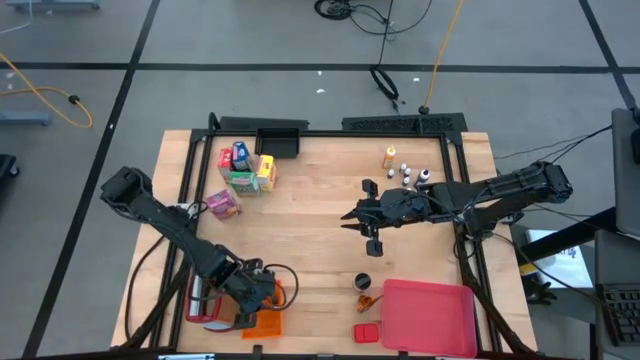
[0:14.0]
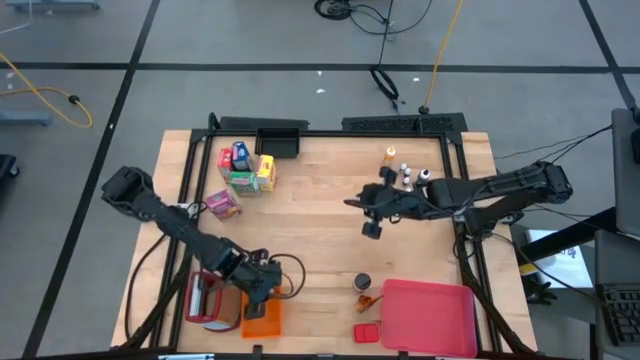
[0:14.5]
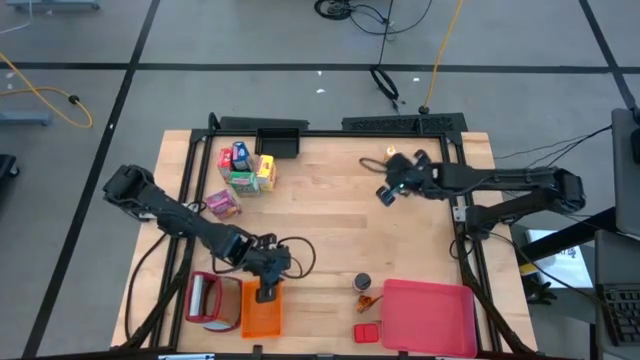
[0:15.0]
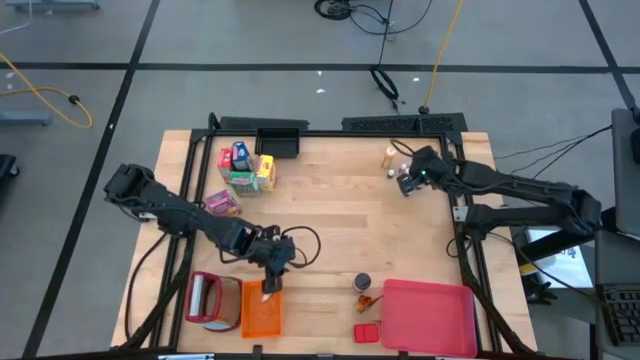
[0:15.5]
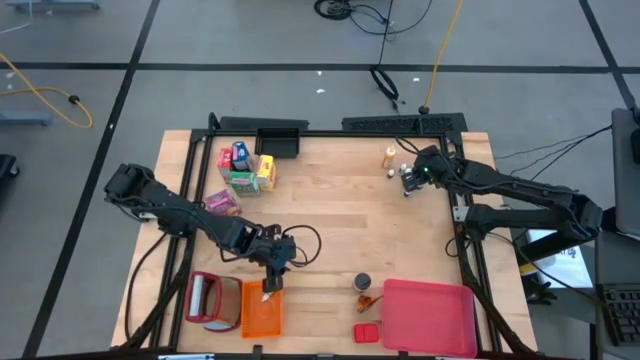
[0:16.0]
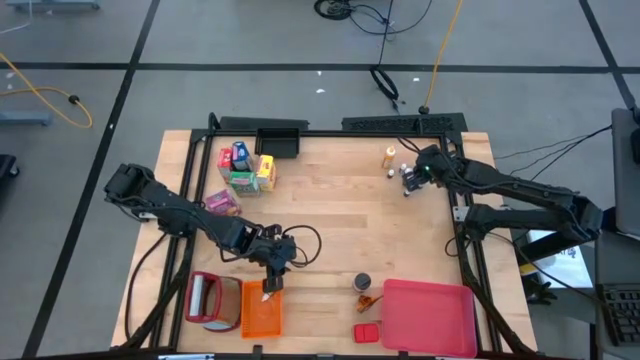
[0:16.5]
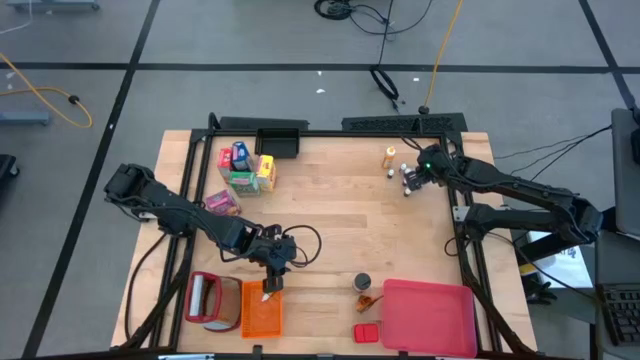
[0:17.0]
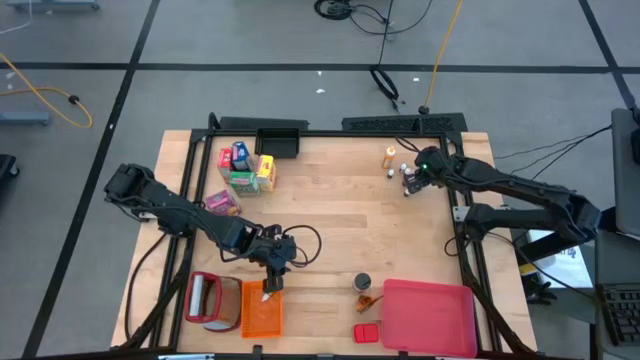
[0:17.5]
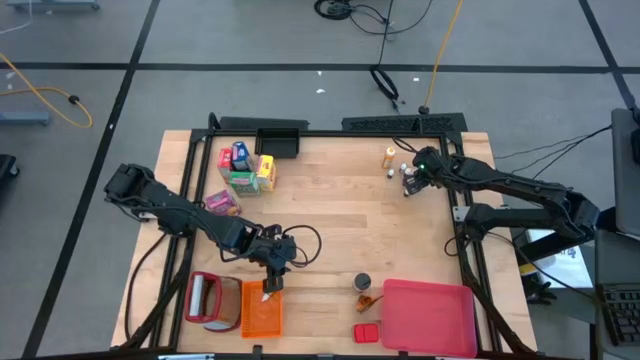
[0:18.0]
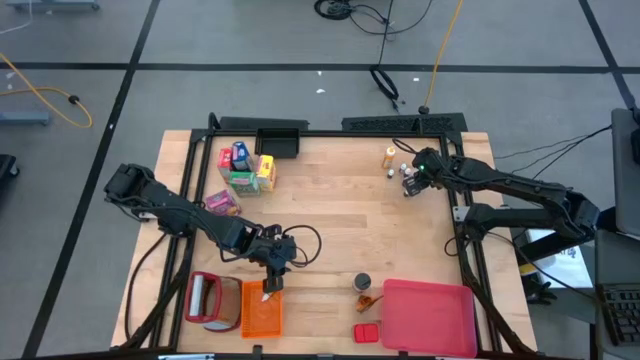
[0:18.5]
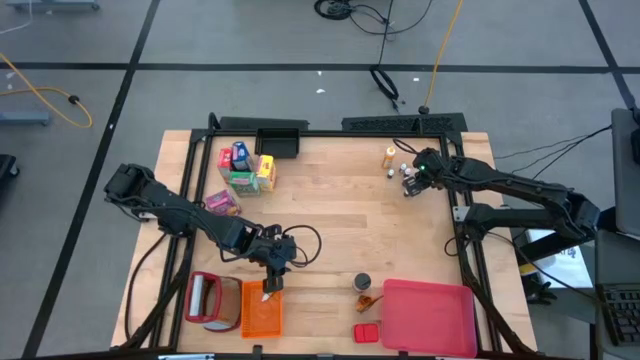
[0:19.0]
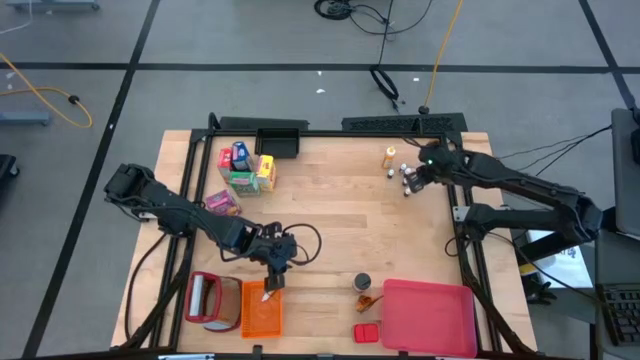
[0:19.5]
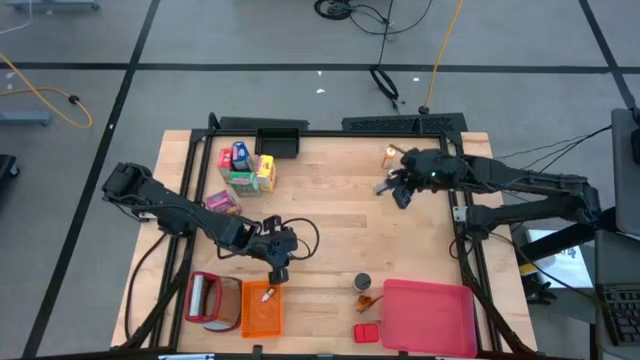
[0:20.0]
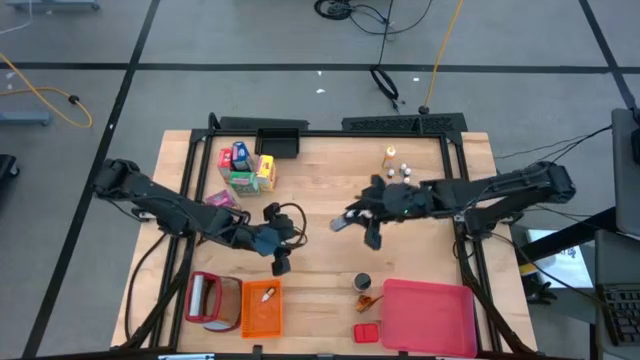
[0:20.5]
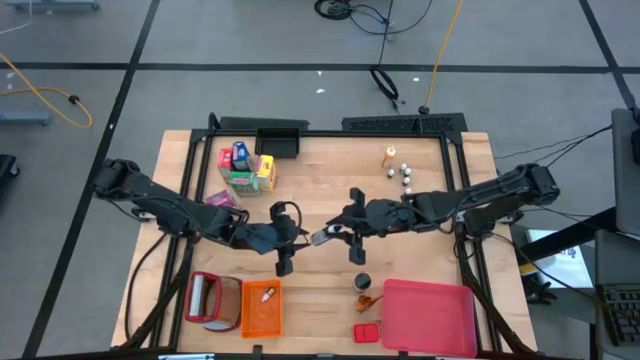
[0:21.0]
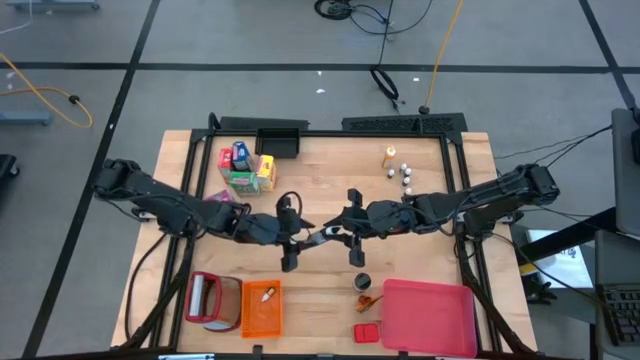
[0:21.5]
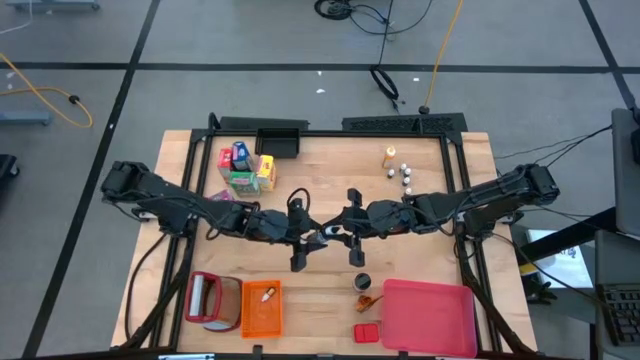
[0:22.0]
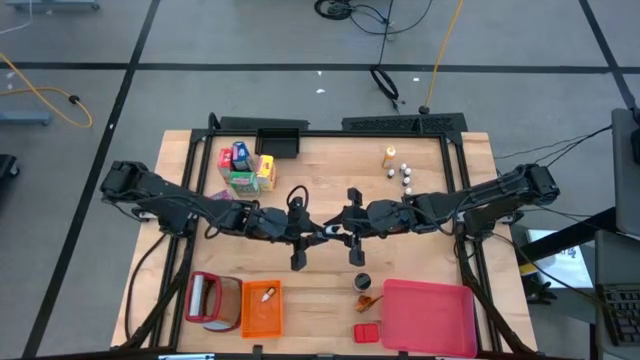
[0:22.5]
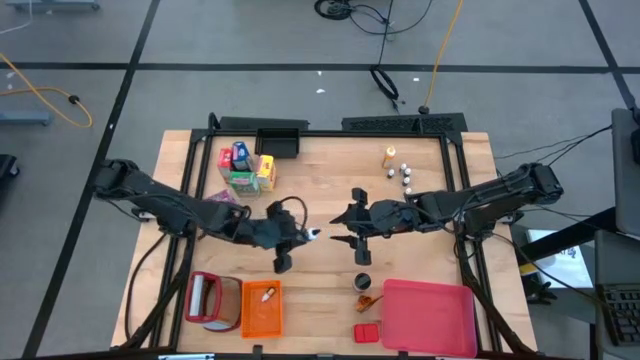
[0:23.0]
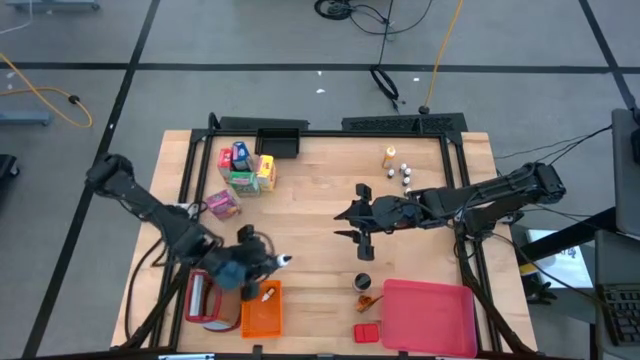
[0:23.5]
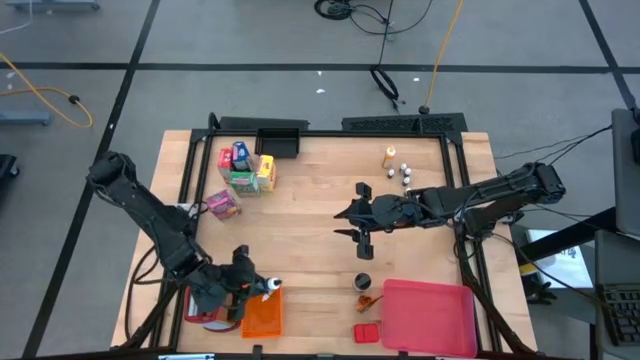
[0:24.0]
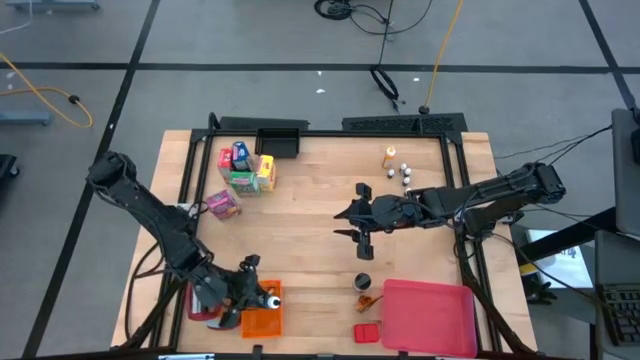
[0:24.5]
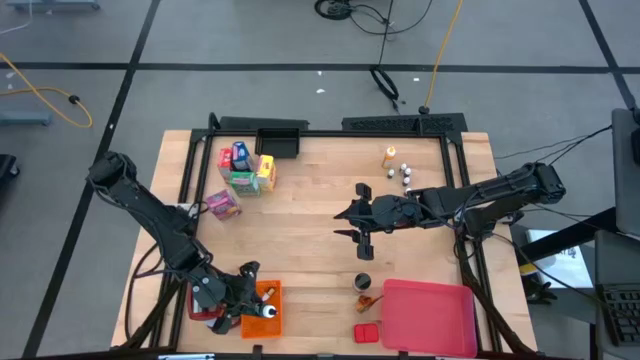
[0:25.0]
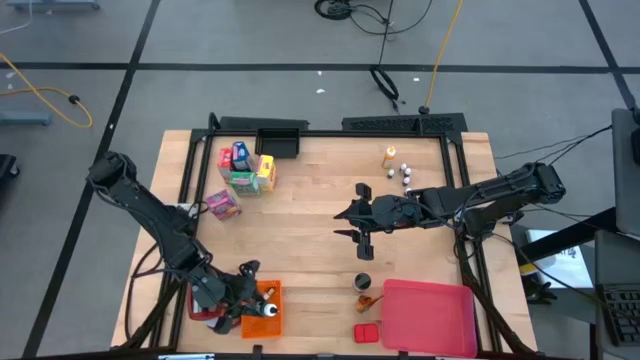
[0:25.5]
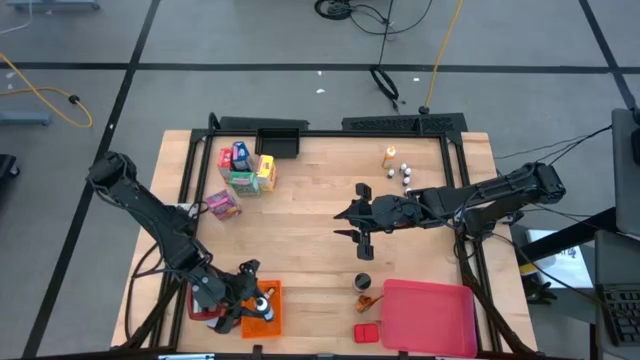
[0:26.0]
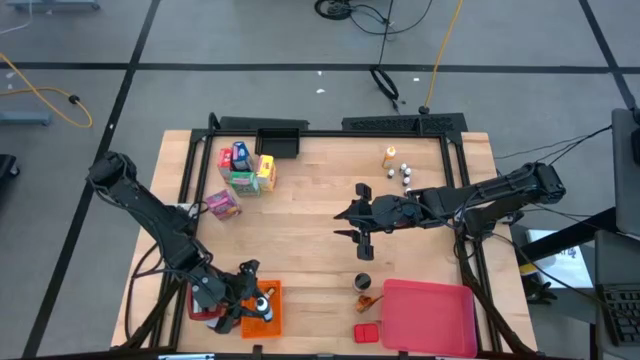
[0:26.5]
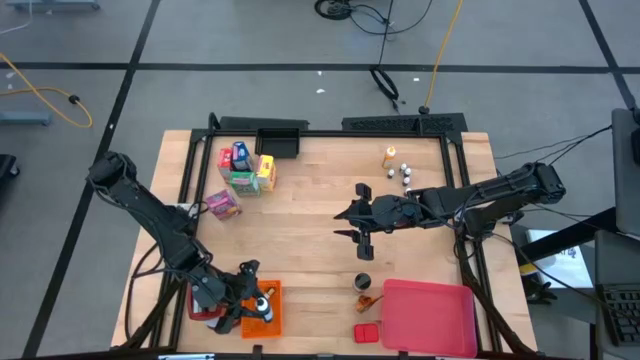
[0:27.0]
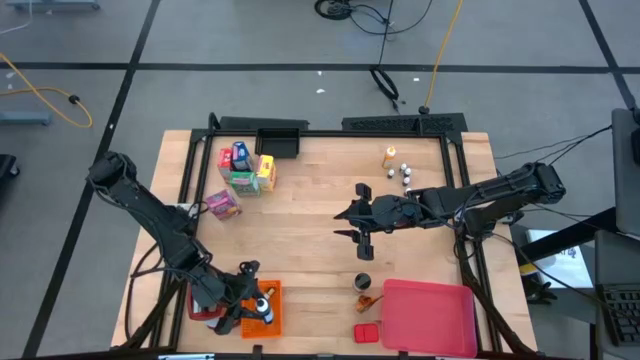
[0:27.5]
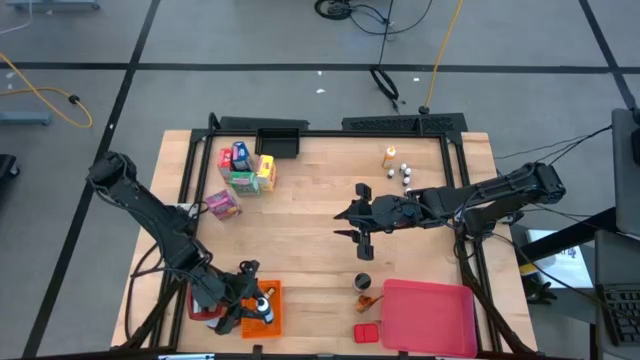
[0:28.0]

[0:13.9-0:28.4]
Task: Pick & Place Kitchen Items
Put the big black food coloring bottle into the orange bin

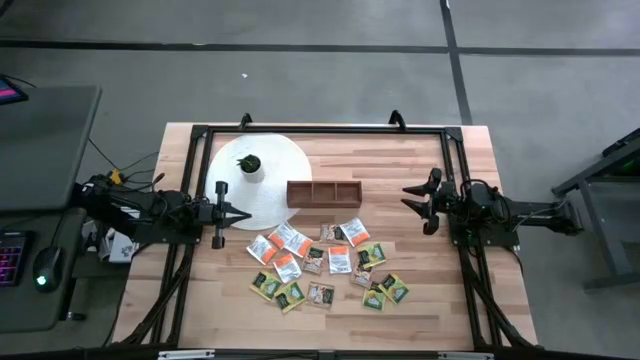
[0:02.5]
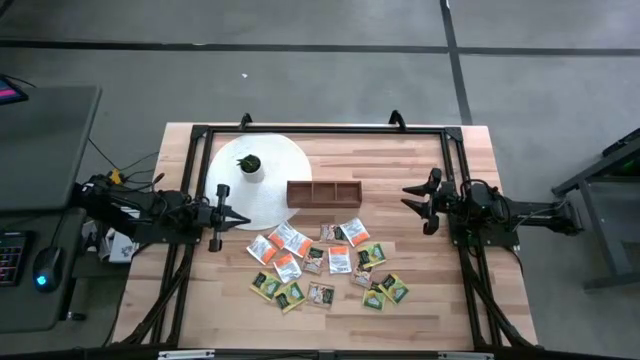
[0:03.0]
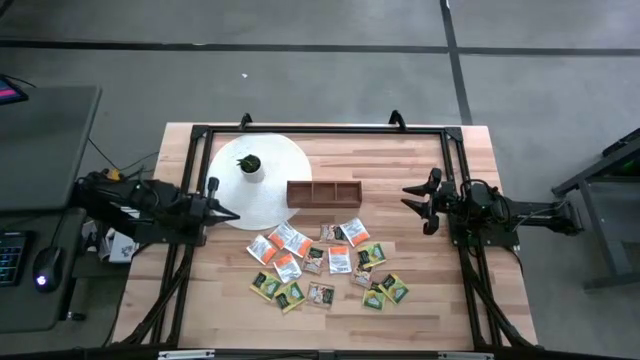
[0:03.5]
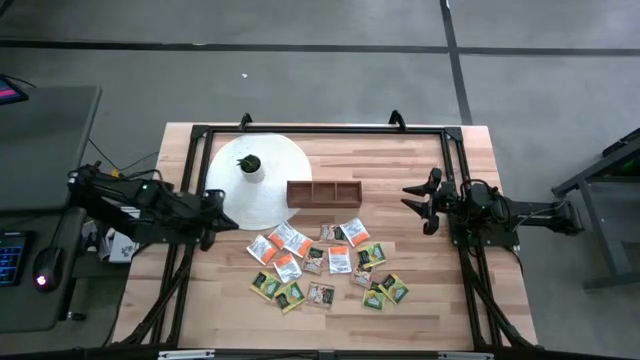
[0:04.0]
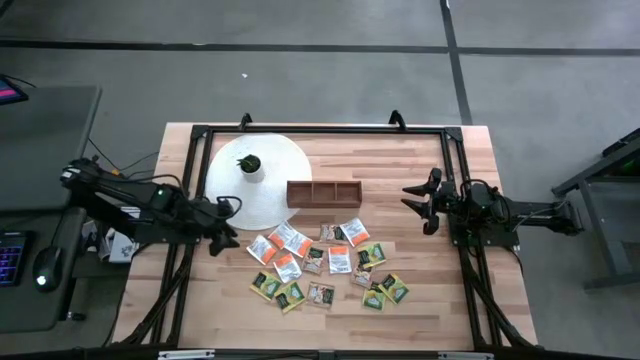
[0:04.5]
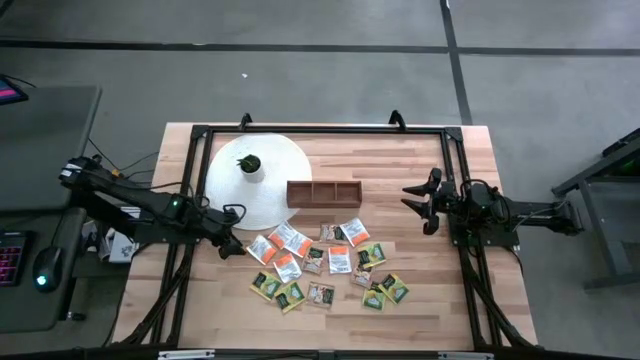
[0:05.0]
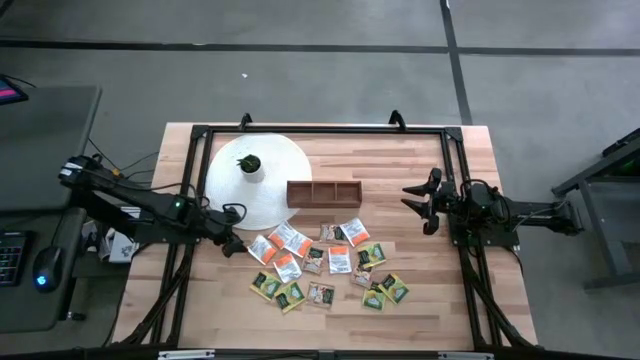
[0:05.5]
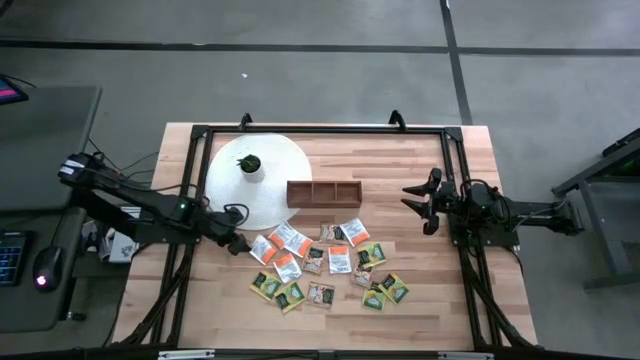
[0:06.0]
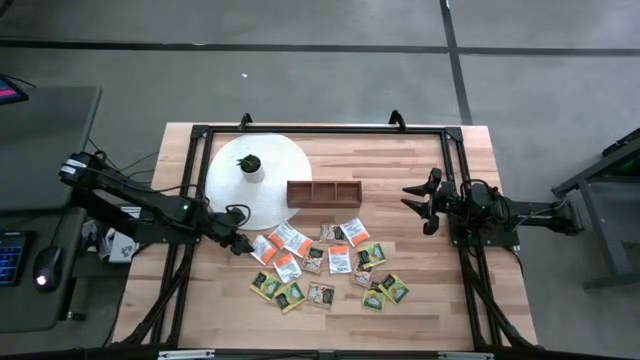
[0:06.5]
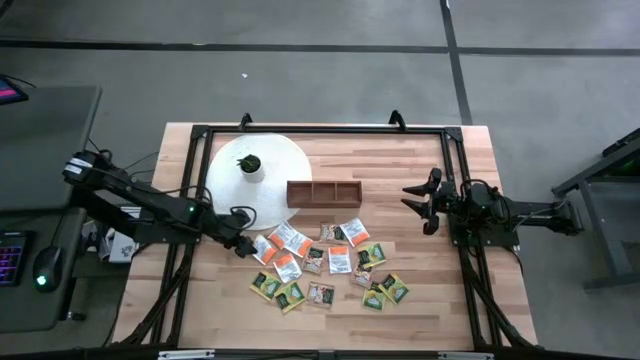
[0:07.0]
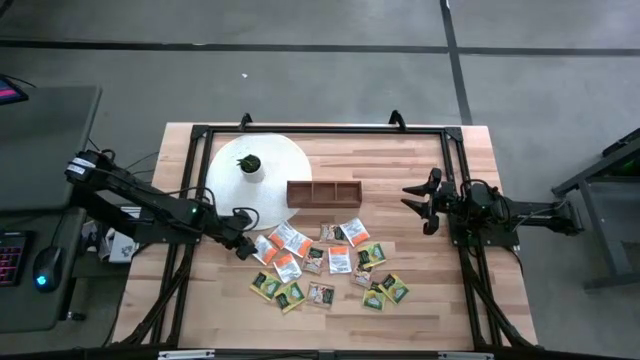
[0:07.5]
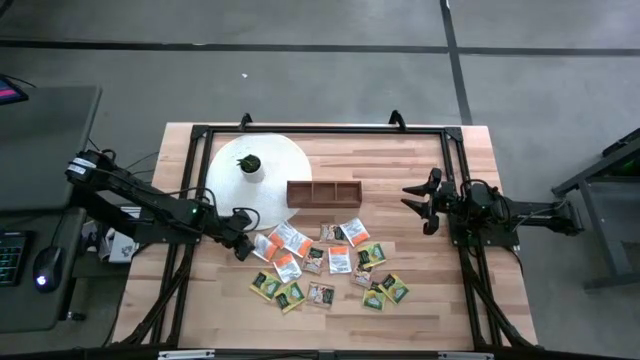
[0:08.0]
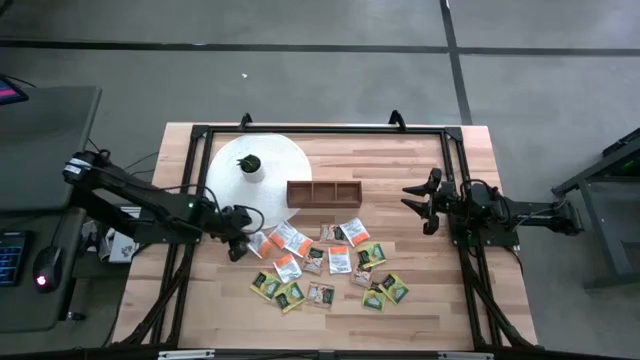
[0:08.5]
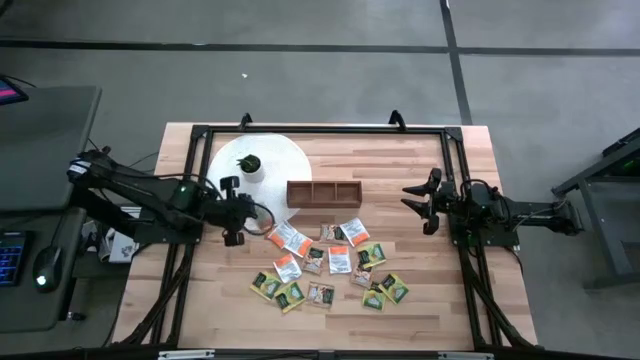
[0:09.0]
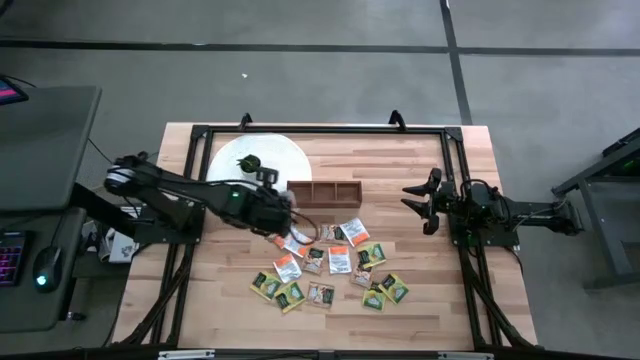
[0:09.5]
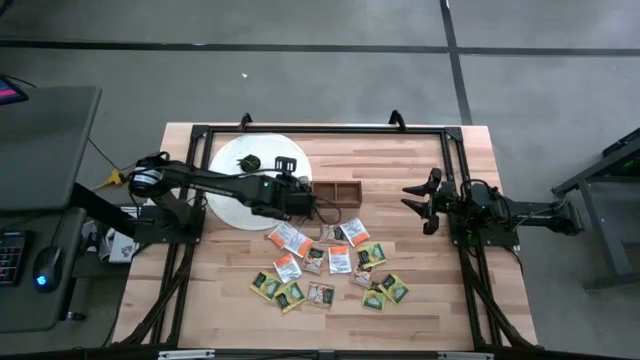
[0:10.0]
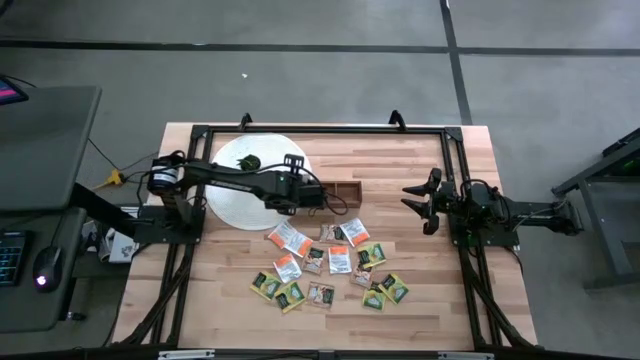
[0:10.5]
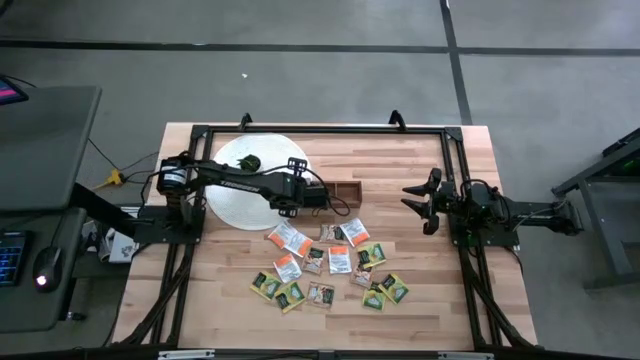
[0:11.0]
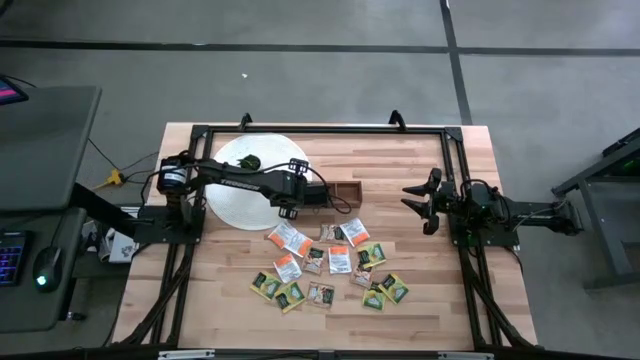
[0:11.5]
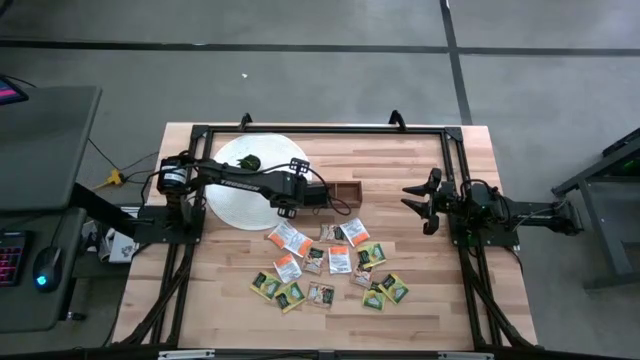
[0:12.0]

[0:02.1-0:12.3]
Task: Pick & Place Tea
Put the white tea bag into the left section of the wooden organizer
